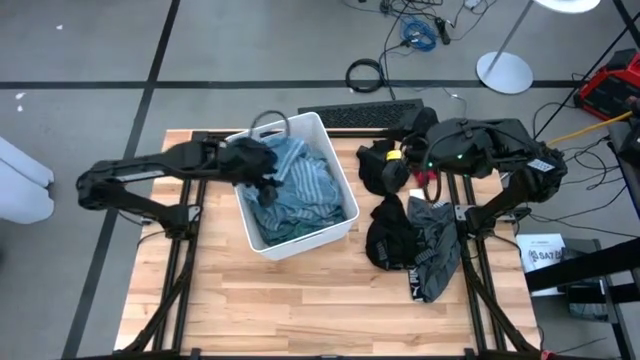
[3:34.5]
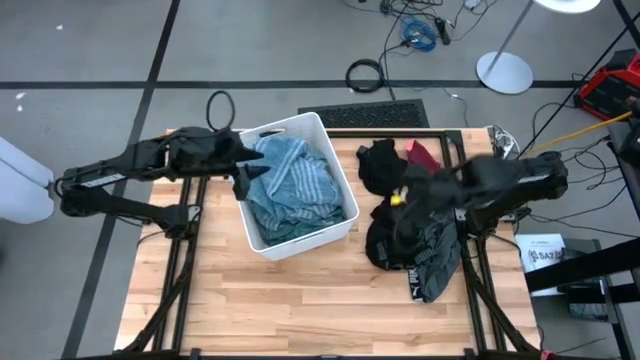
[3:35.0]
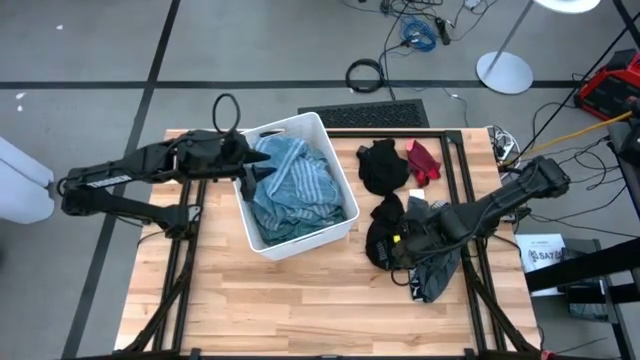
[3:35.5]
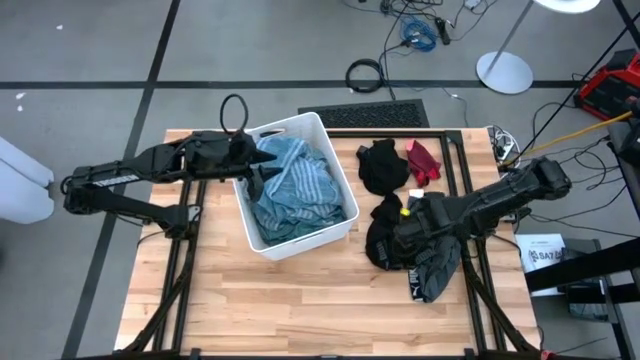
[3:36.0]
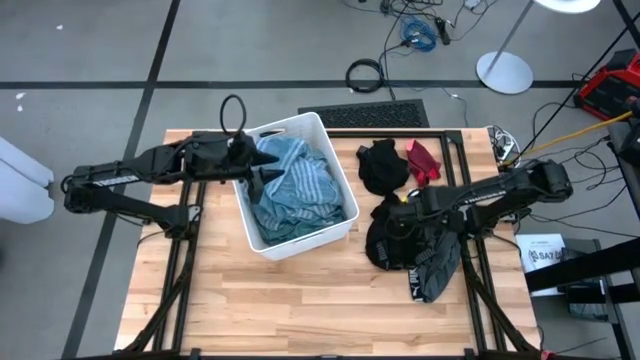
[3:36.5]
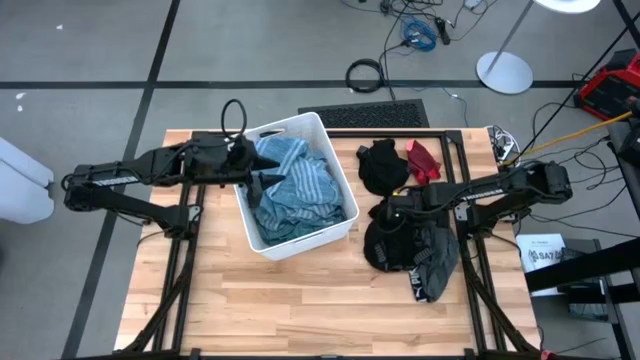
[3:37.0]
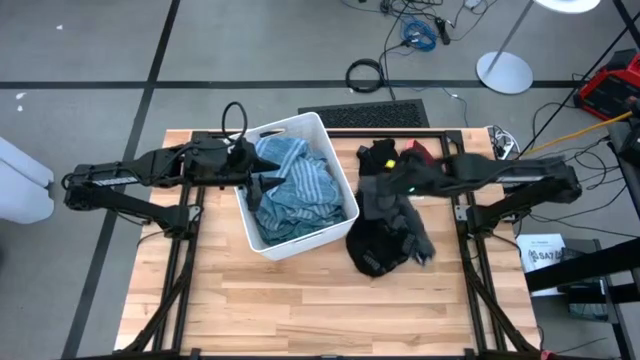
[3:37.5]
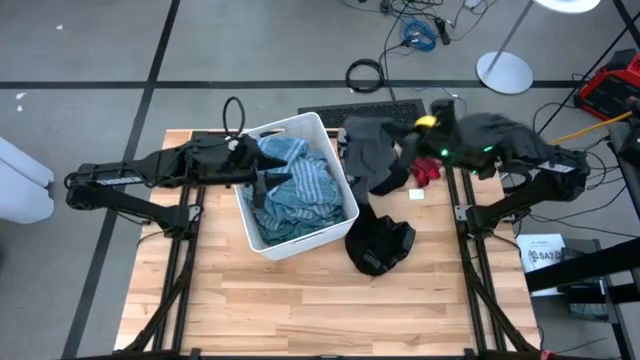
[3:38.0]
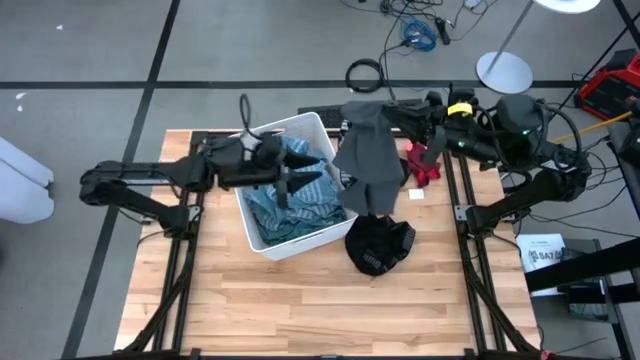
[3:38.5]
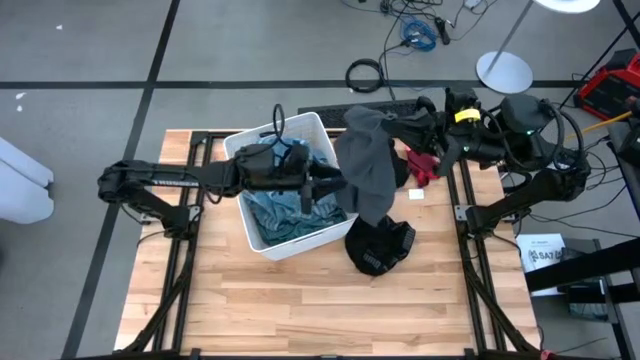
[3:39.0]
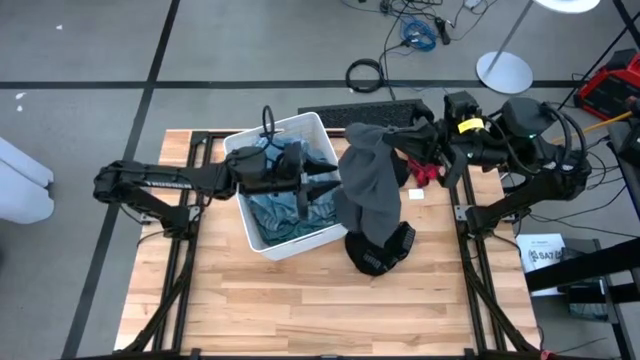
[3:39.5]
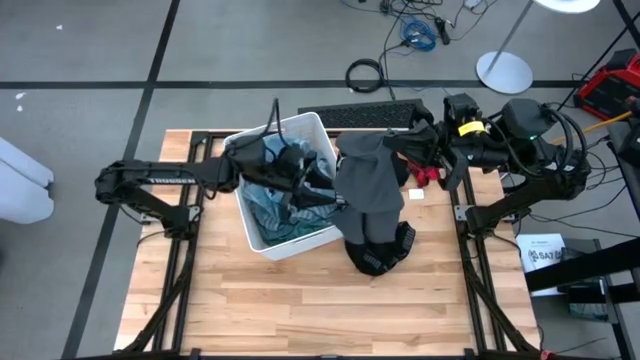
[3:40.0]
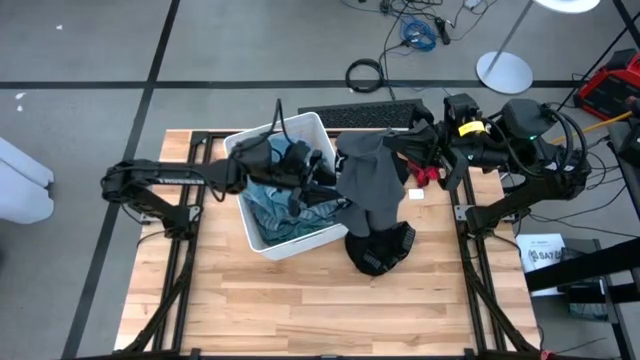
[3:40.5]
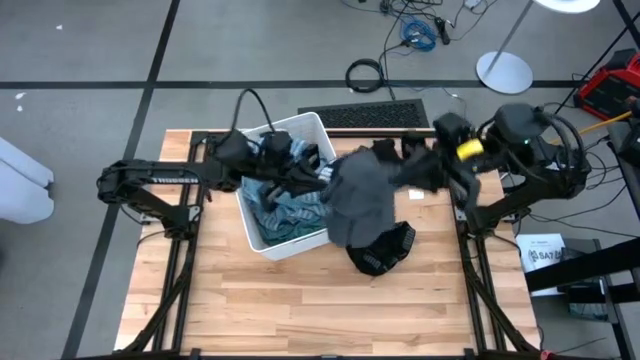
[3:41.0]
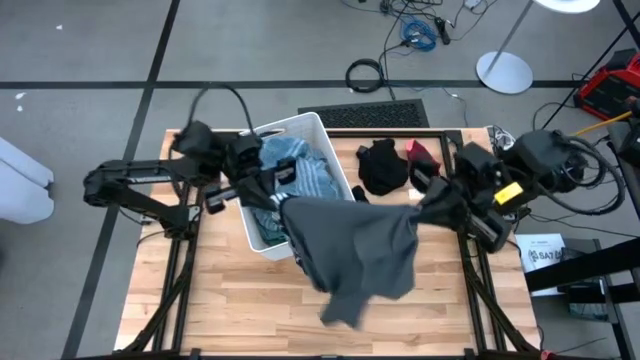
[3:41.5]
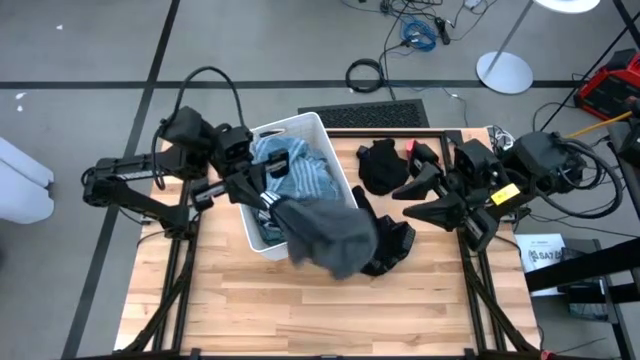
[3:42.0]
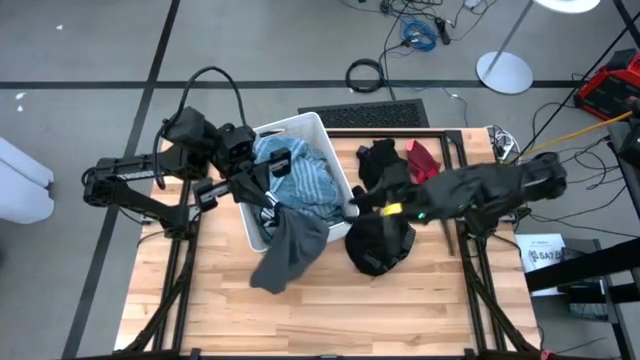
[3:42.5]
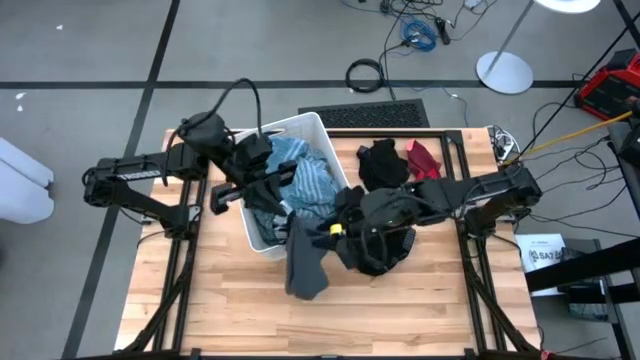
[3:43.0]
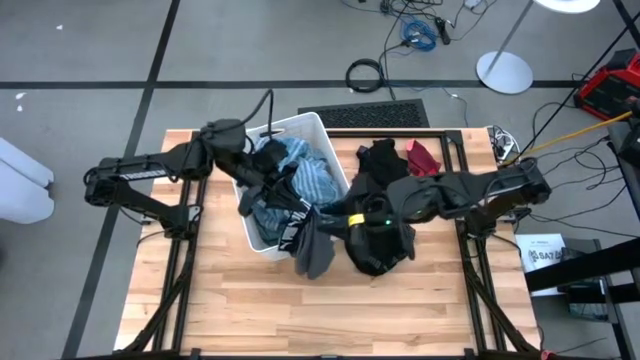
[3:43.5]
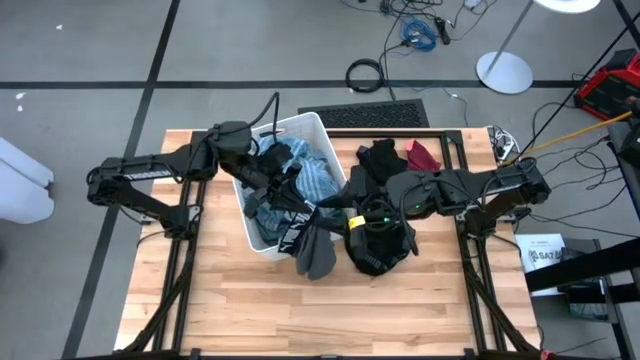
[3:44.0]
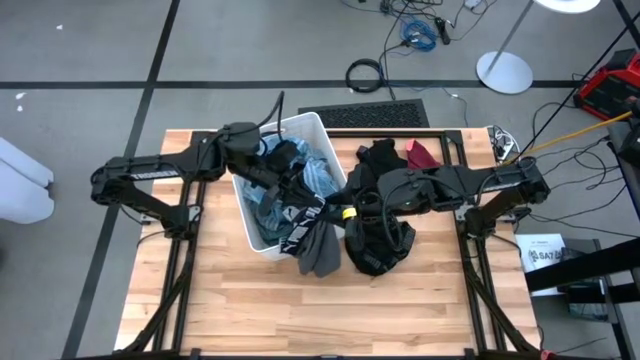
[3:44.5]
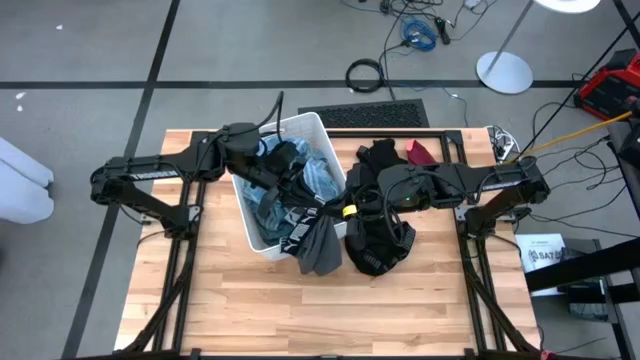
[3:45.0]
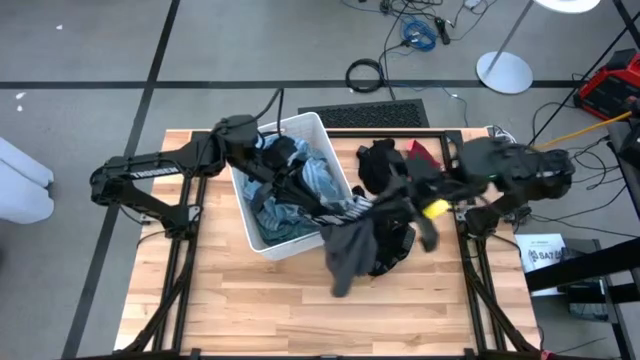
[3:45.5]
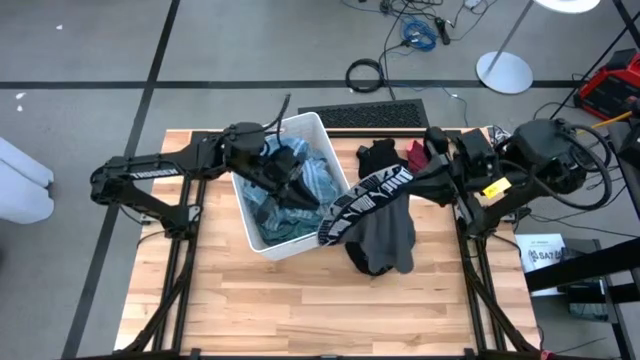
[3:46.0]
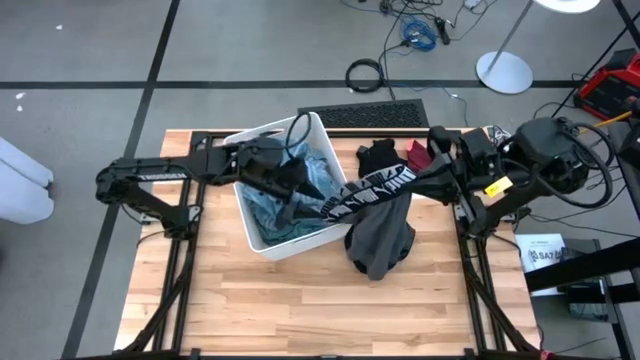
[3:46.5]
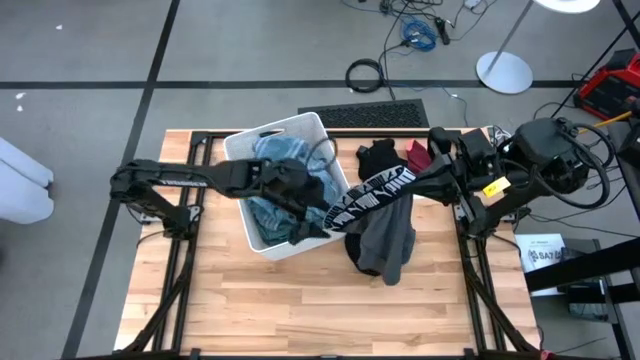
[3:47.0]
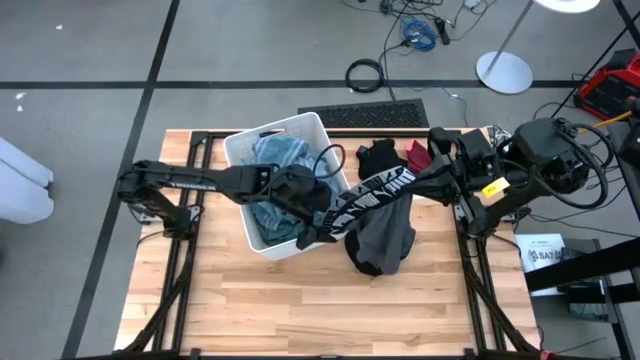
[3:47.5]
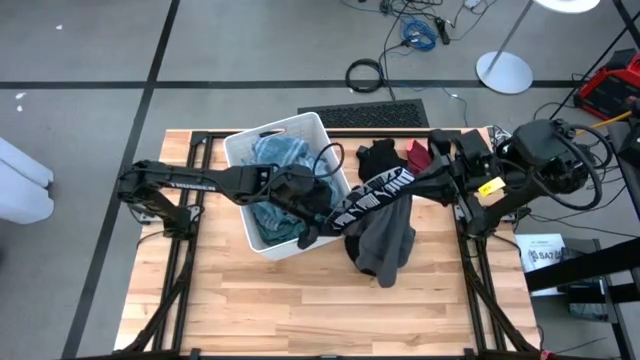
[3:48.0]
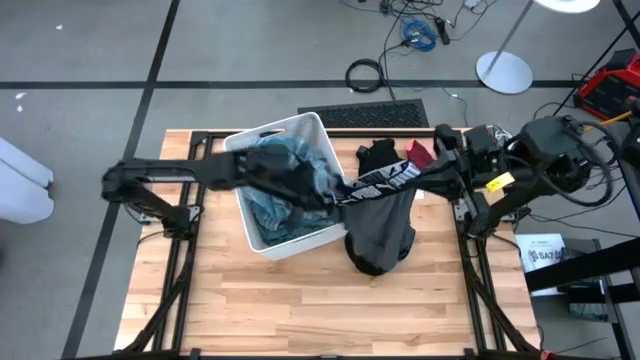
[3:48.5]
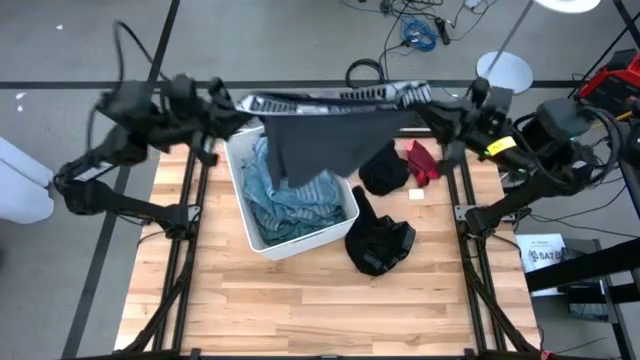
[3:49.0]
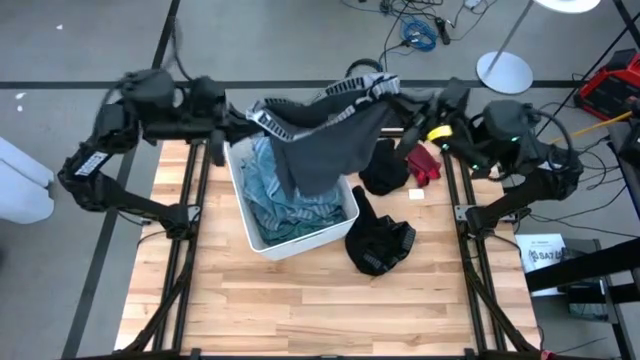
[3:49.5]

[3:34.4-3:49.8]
Task: Sort clothes
Put the gray short into the white laundry bin

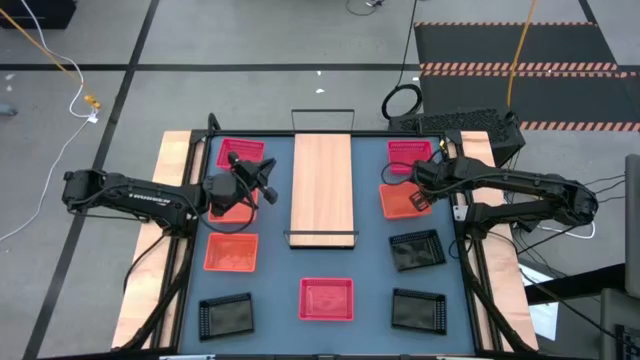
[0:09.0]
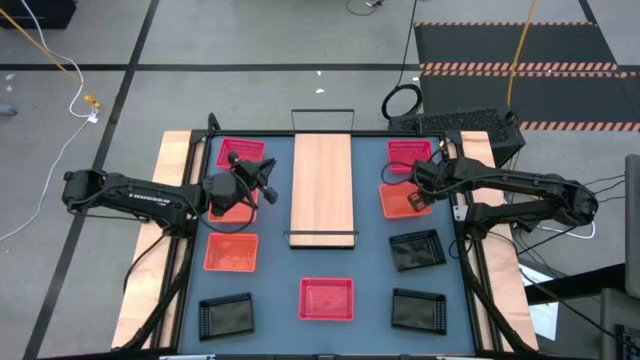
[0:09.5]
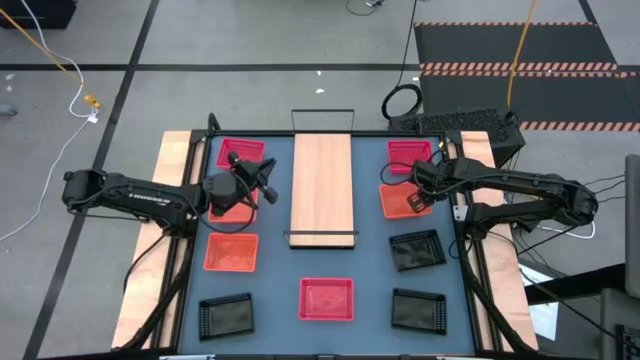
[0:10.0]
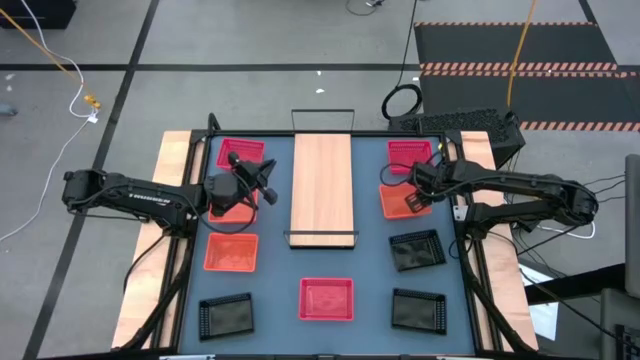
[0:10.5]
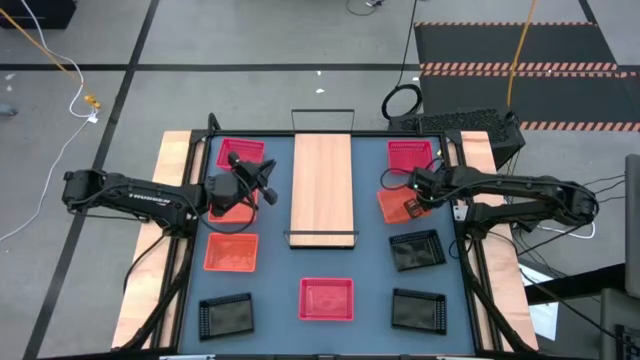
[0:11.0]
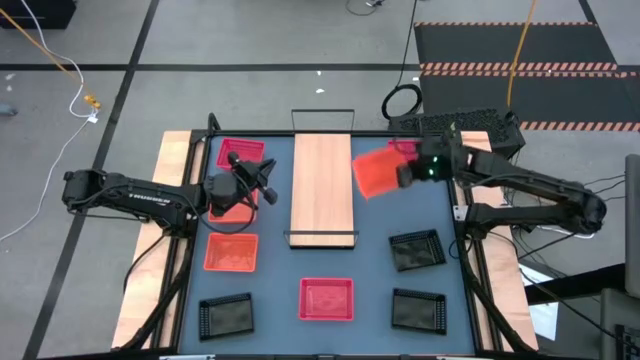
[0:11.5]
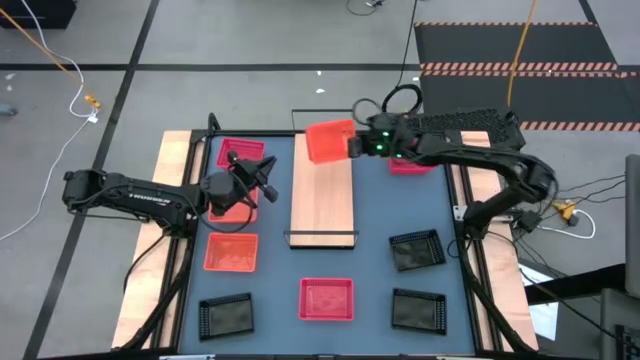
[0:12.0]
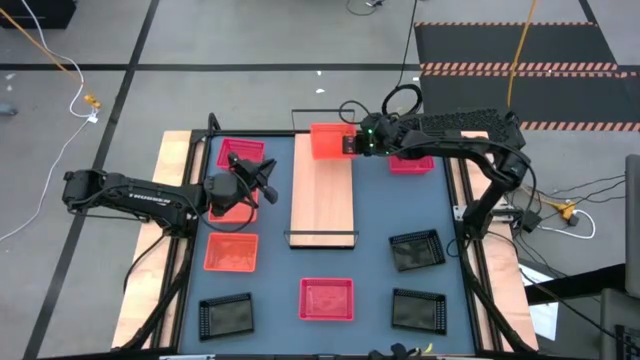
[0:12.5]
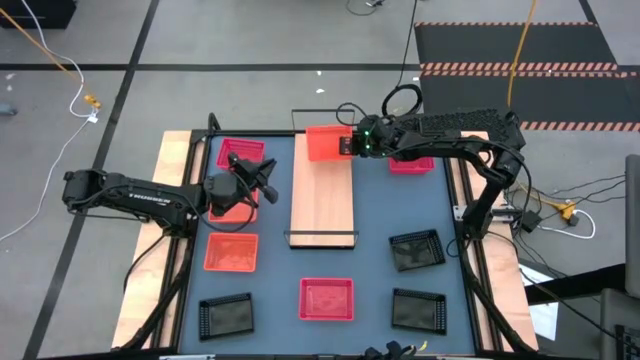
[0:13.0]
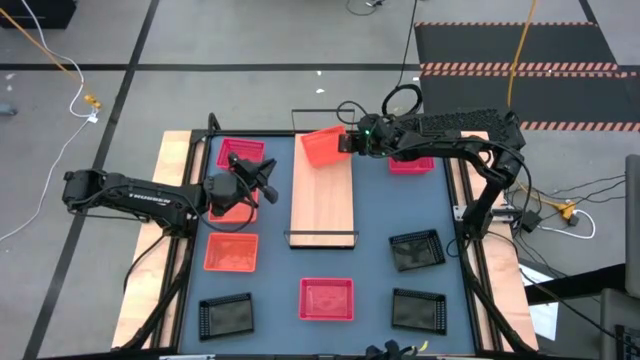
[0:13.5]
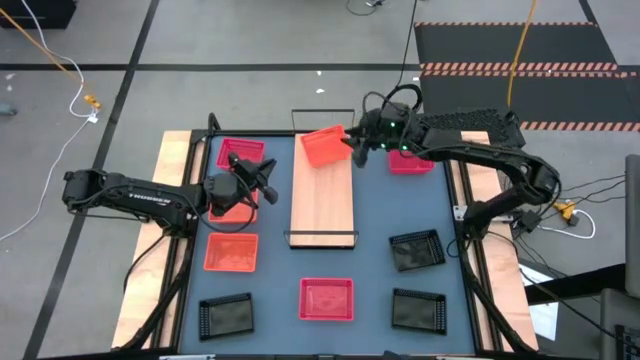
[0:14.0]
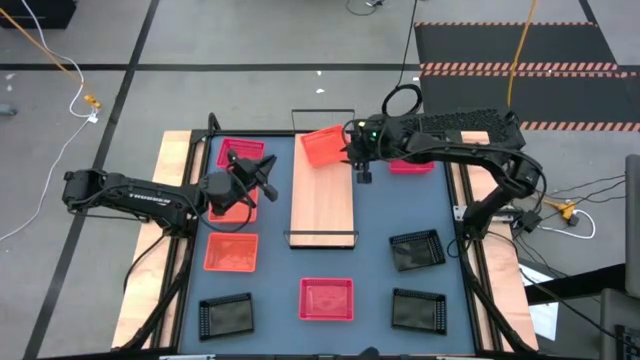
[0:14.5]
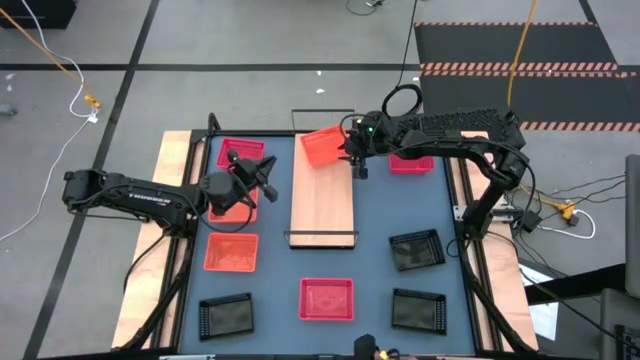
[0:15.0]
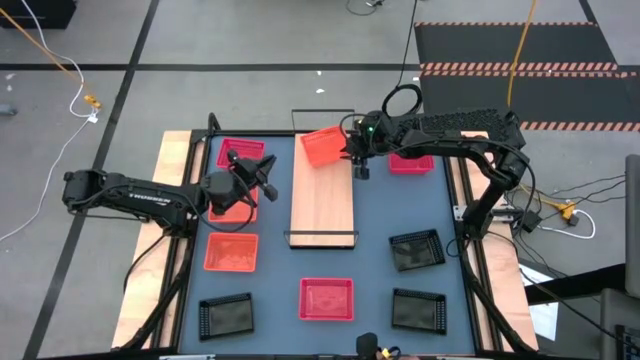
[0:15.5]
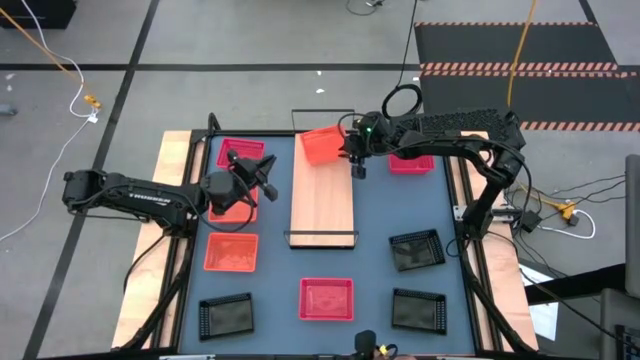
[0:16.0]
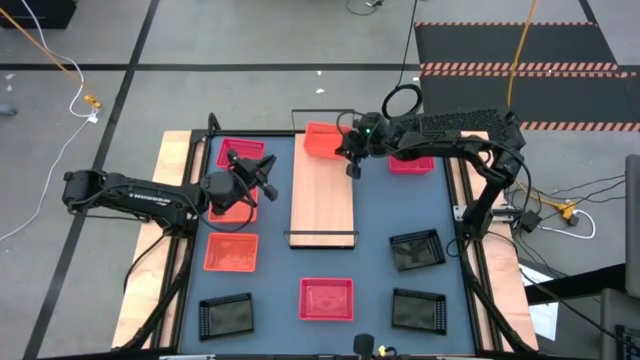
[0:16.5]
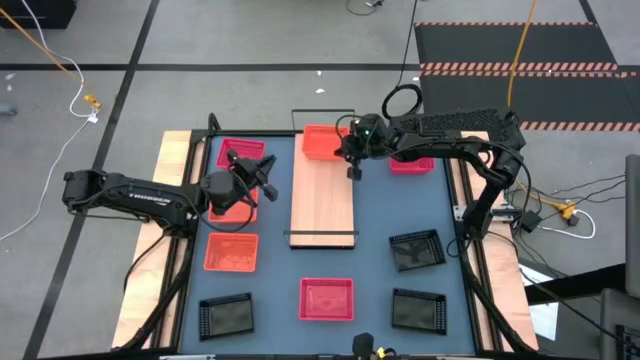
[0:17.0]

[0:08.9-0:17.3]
Task: Stack baskets on shelf by color
Put the top right orange bin on the shelf
